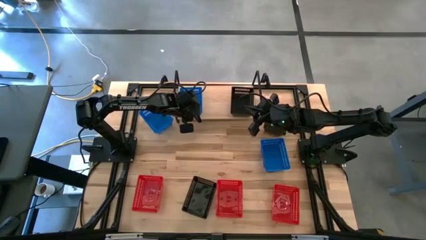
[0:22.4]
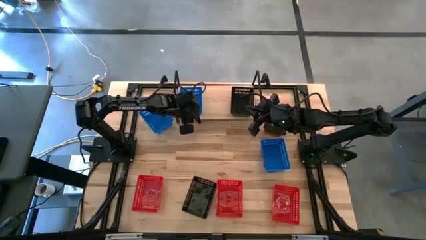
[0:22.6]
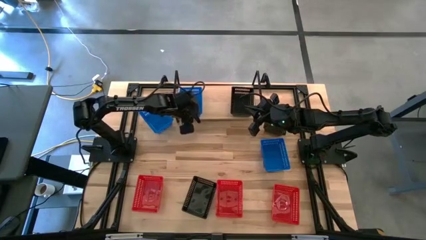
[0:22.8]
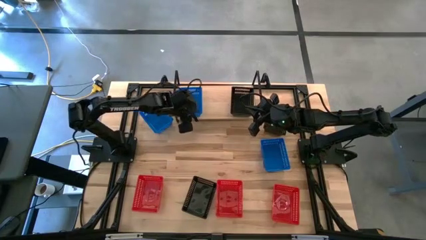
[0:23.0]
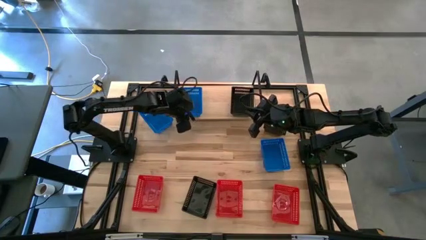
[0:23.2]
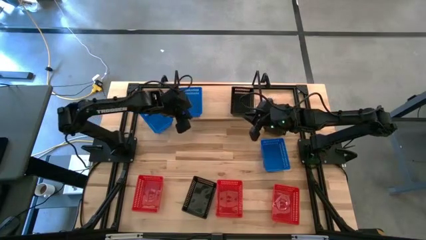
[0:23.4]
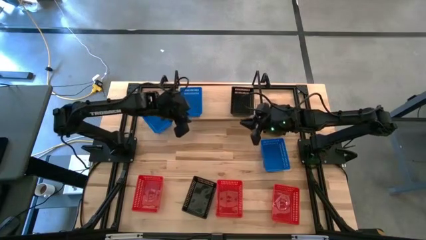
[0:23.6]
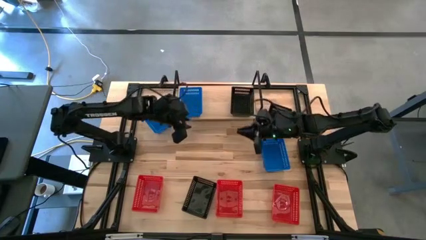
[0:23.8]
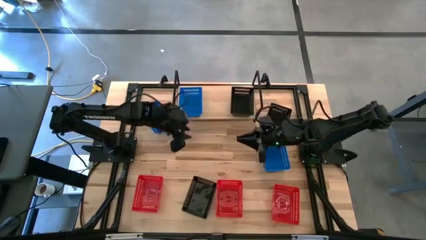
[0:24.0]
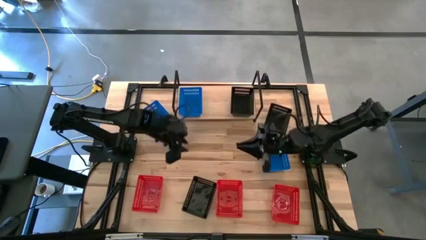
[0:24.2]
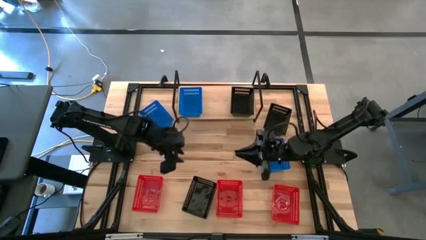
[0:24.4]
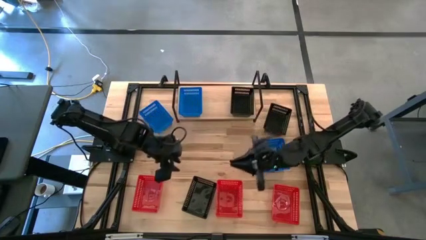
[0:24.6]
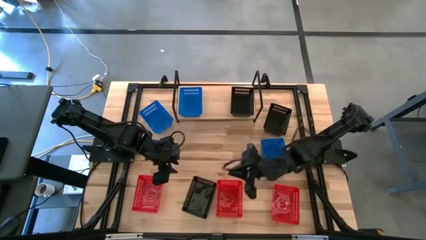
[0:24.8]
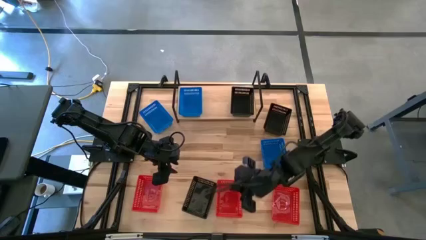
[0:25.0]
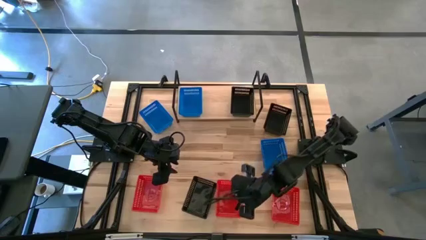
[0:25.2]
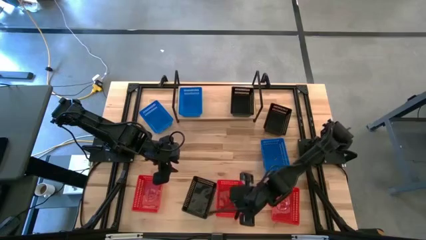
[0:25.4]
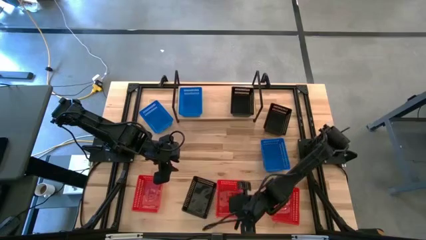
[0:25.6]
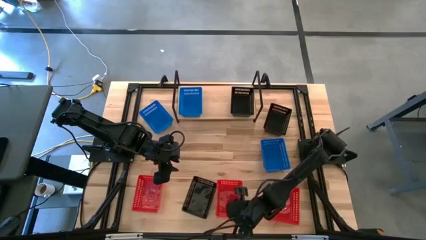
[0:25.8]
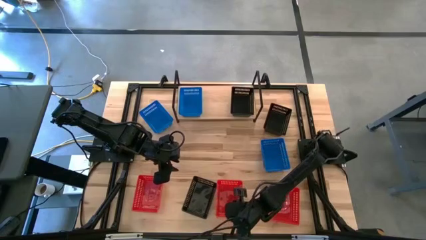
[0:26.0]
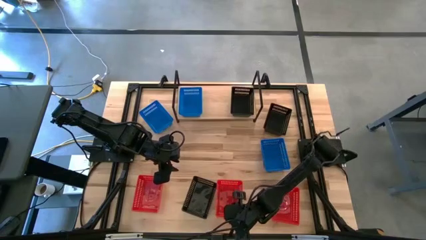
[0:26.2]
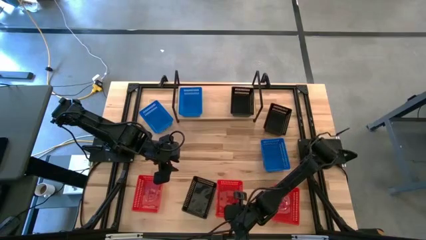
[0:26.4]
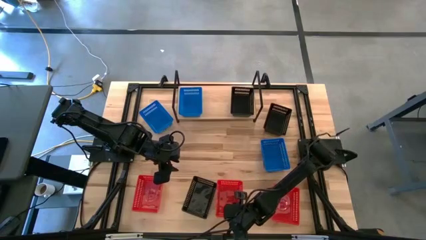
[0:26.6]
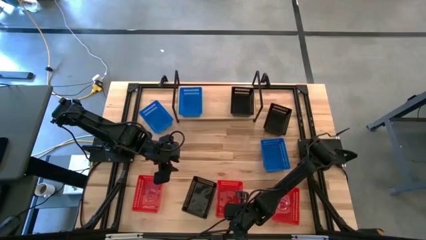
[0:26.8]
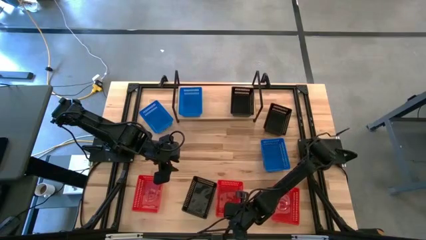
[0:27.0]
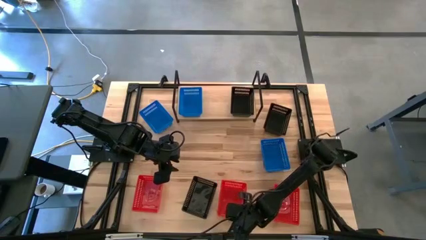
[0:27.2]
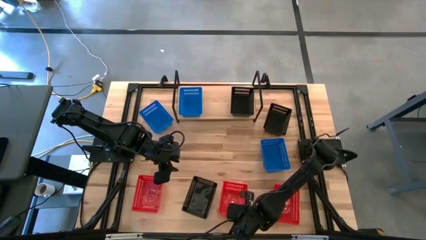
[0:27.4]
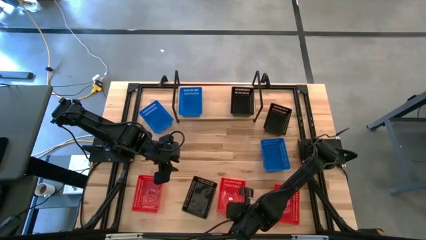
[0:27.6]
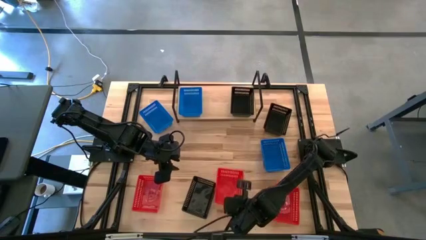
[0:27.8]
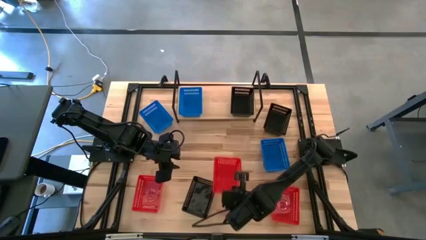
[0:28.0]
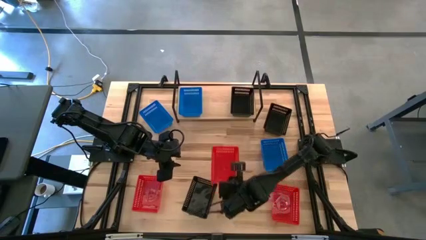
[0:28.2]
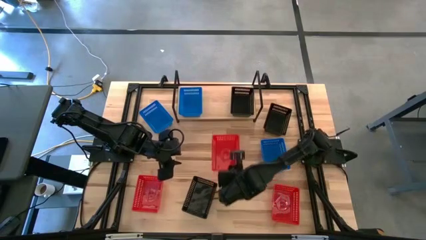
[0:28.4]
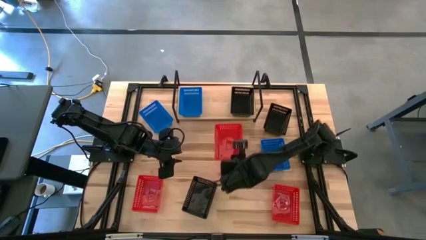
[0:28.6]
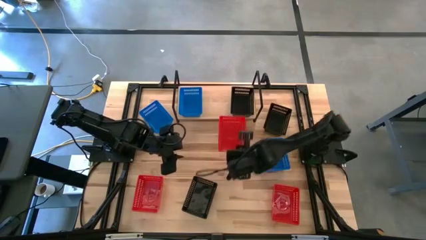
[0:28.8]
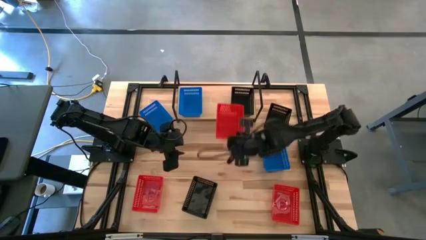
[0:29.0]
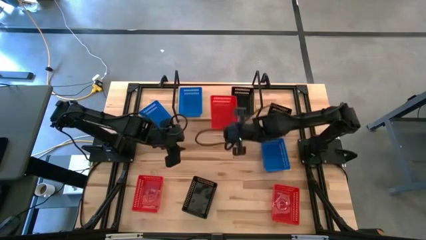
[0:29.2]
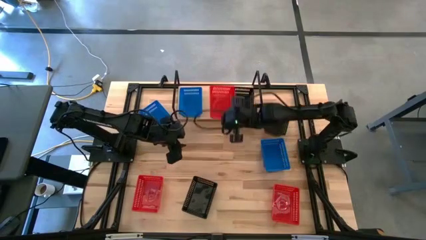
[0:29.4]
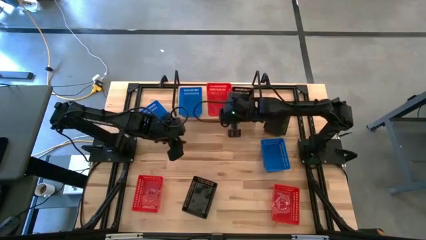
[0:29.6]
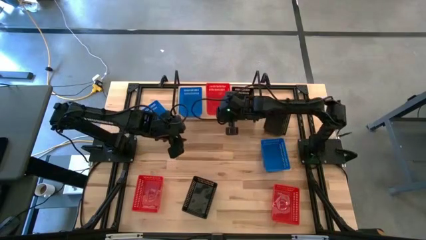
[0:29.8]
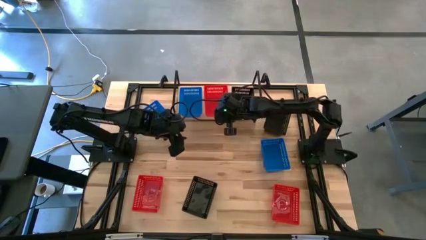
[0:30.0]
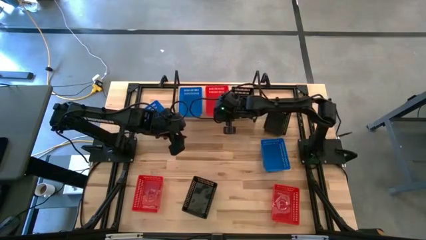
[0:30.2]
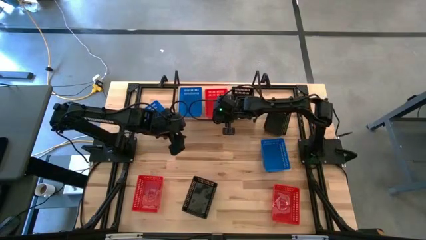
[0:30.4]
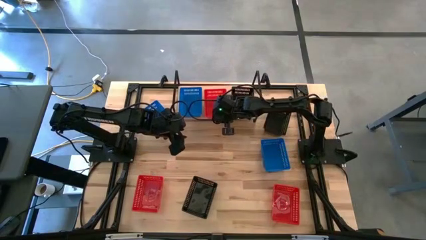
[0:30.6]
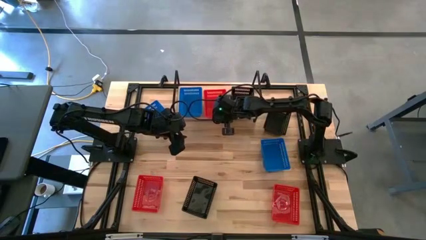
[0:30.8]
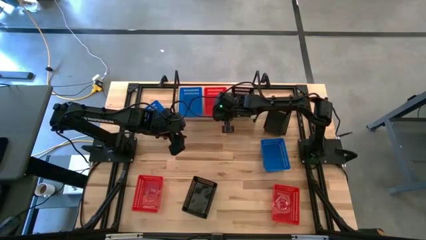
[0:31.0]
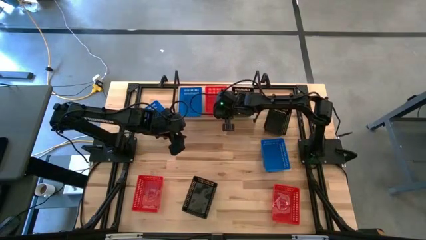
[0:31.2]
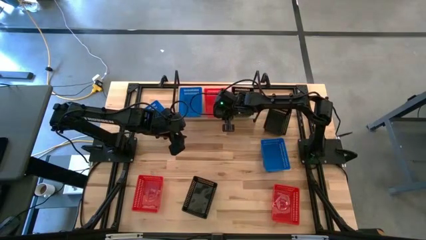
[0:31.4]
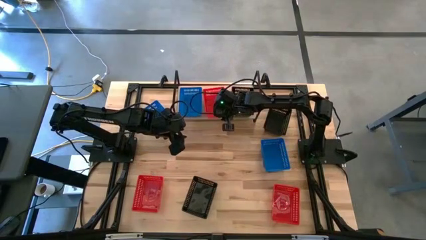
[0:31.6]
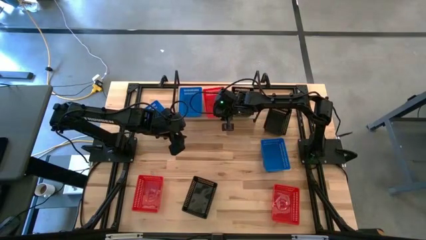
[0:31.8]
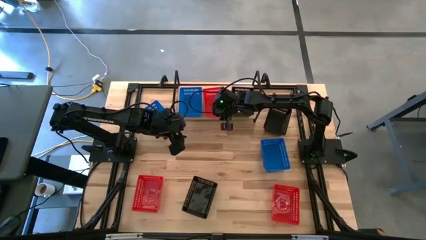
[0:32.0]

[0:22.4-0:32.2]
Task: Stack baskets on shelf by color
Put the middle red bin on the shelf

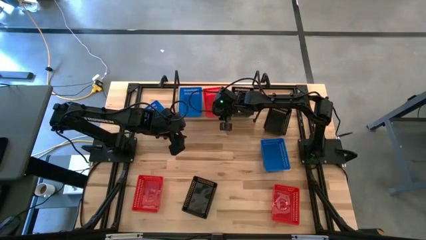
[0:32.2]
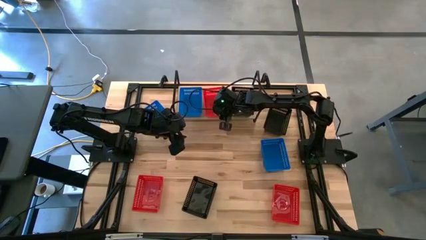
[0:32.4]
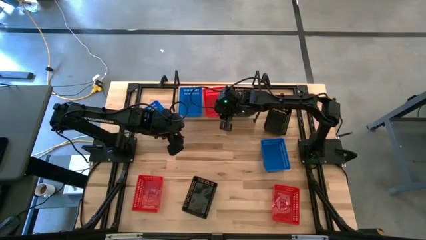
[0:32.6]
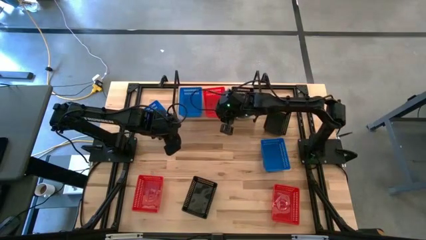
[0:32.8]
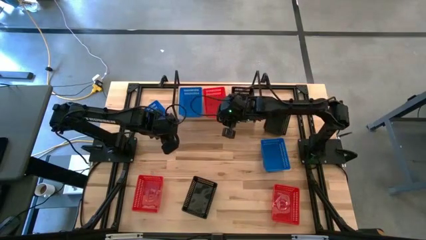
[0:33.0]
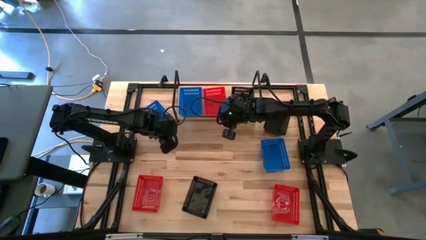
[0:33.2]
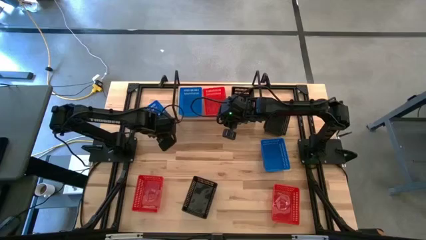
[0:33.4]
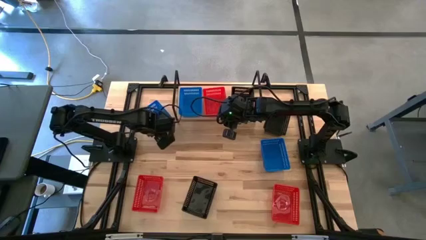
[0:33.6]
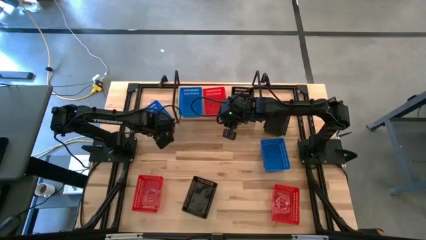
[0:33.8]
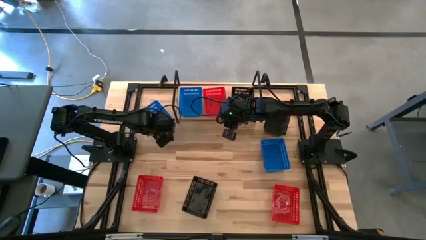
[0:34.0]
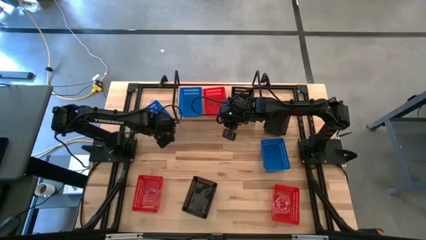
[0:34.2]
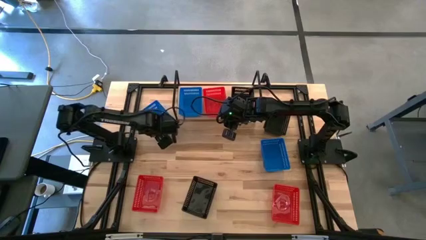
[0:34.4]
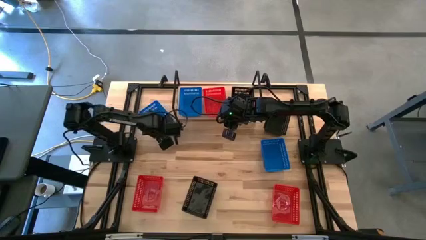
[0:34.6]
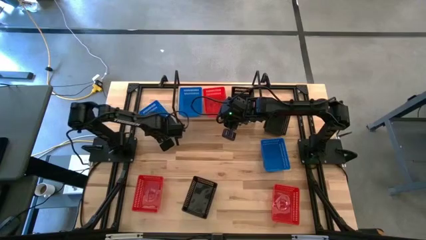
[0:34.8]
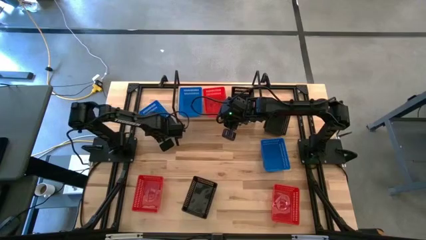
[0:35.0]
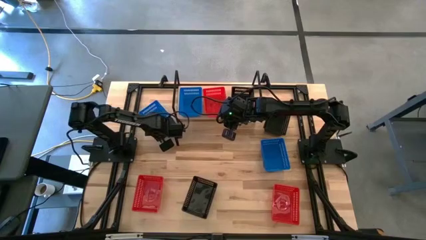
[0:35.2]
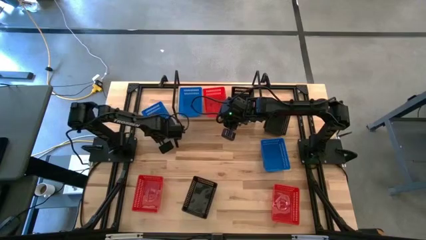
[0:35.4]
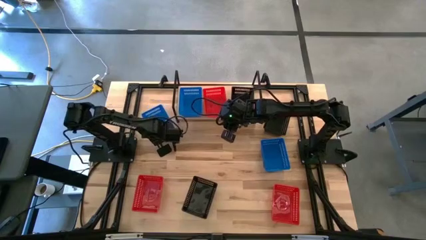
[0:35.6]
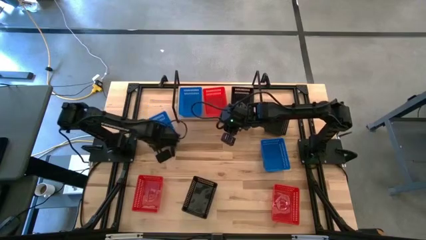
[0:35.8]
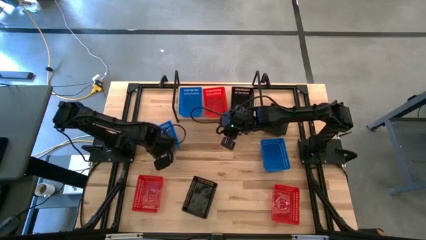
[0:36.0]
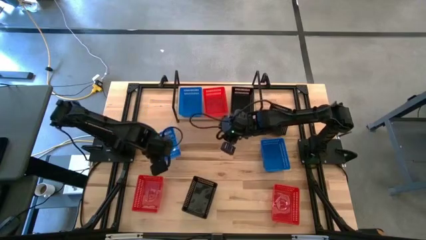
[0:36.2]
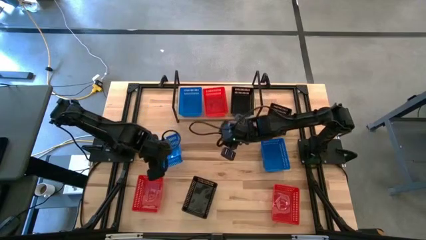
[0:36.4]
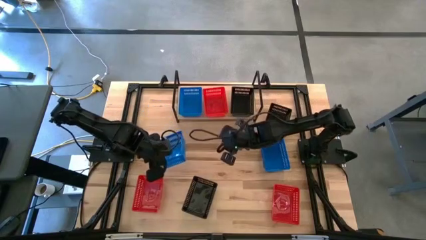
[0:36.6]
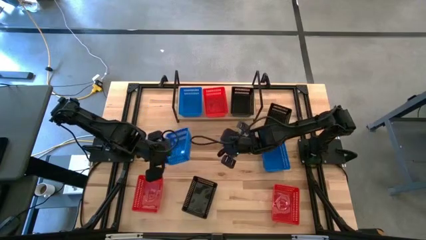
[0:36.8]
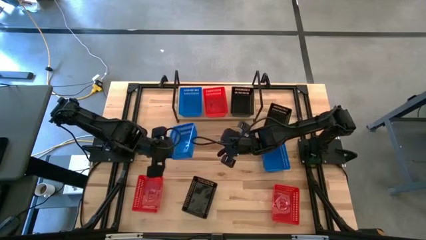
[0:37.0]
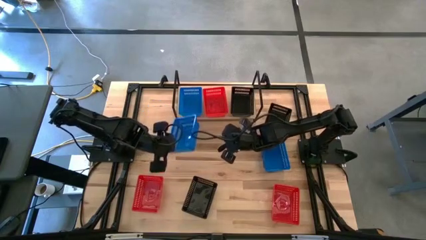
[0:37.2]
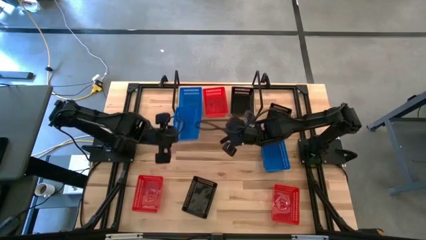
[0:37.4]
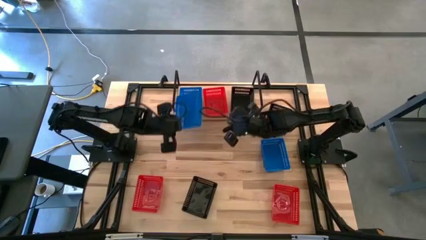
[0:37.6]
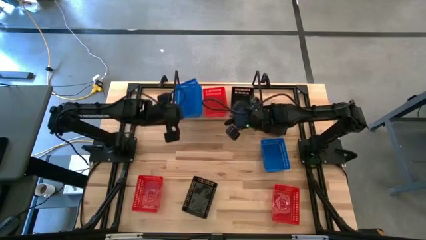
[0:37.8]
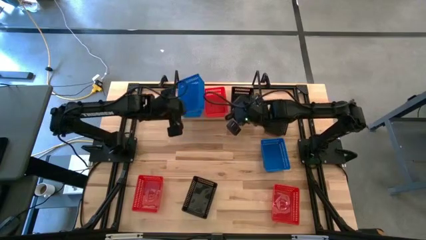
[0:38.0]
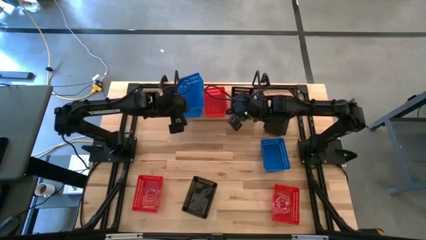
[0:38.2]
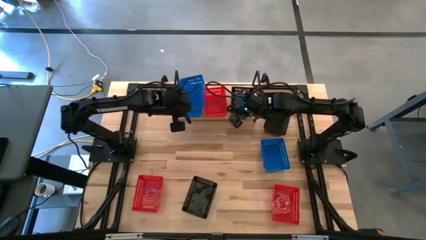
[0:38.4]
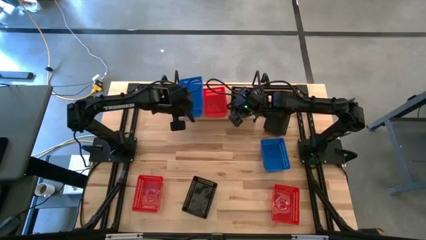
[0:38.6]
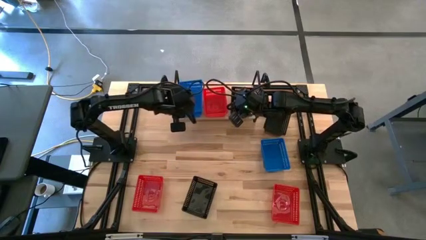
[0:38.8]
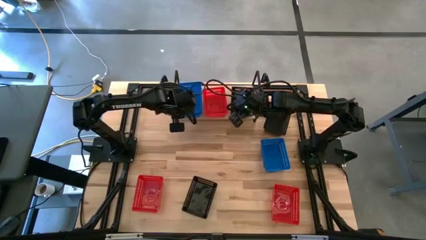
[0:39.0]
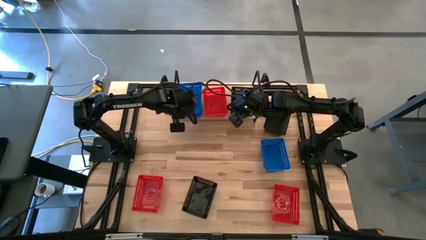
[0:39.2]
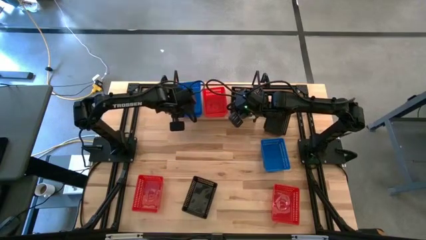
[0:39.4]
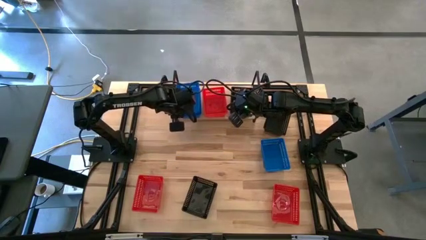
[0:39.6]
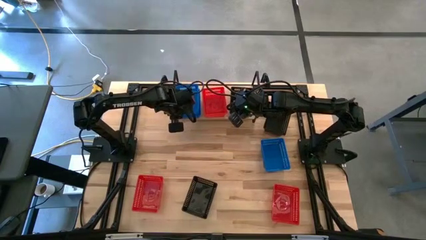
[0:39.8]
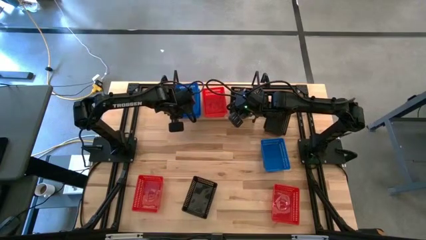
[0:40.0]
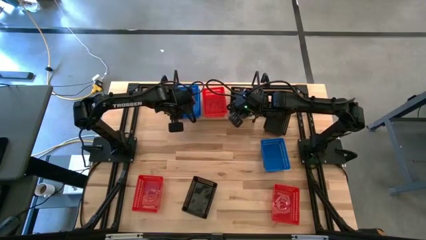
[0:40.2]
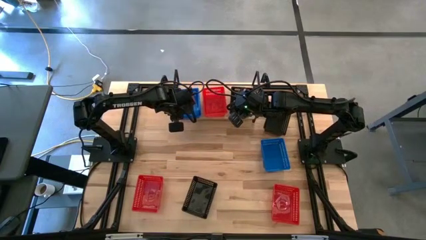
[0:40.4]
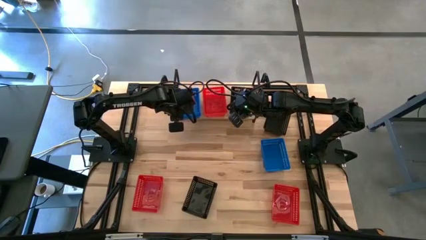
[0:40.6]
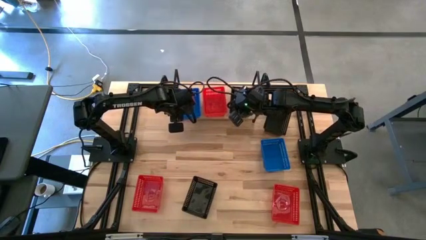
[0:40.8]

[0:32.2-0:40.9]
Stack the left blue bin on top of the blue bin on the shelf
